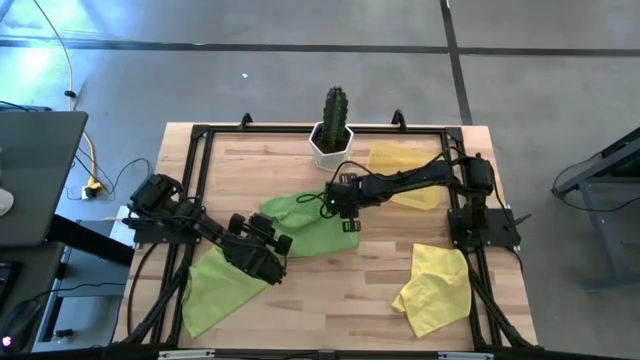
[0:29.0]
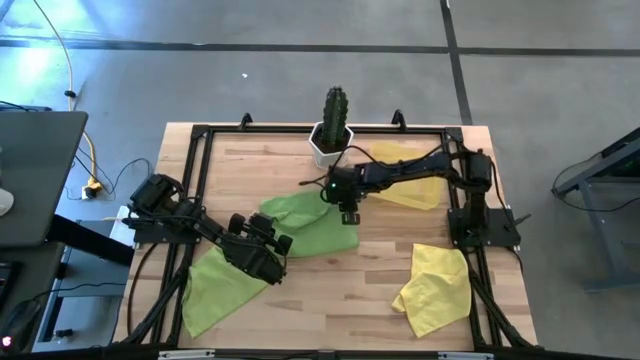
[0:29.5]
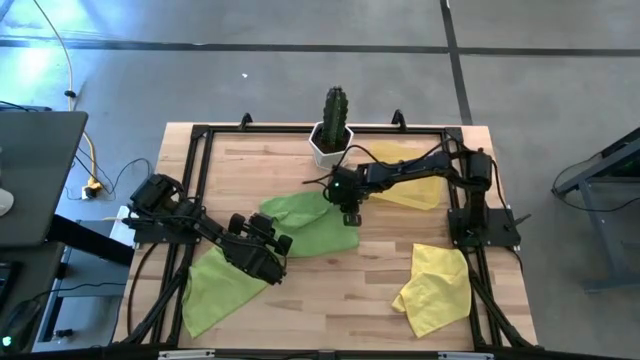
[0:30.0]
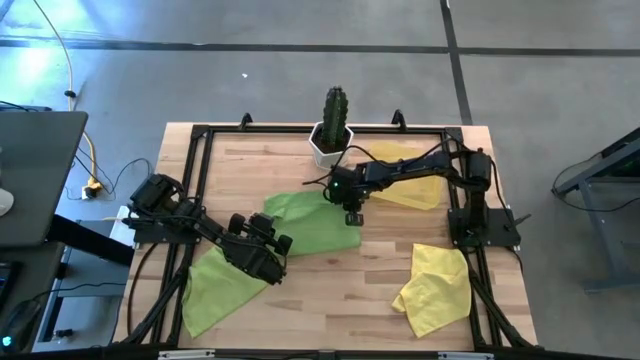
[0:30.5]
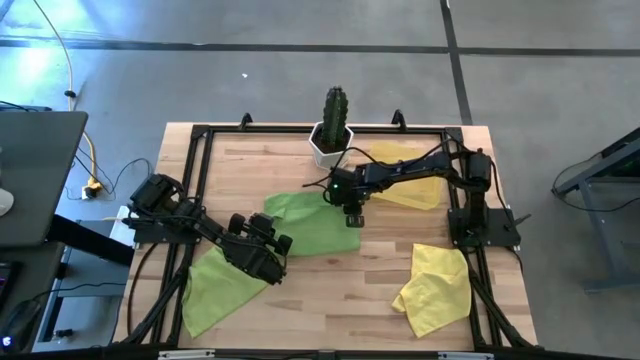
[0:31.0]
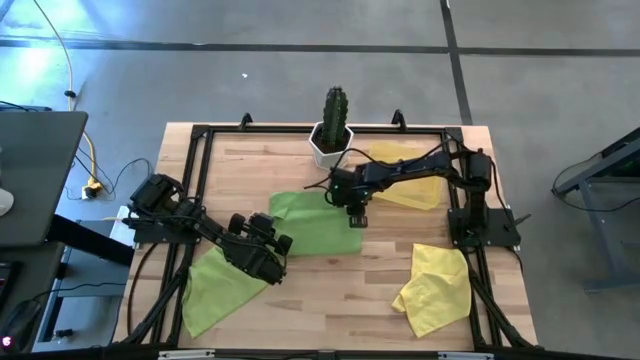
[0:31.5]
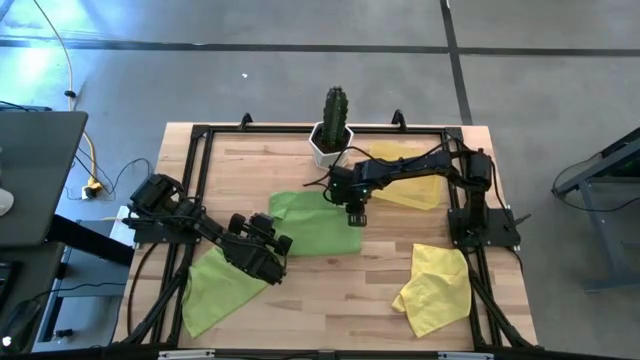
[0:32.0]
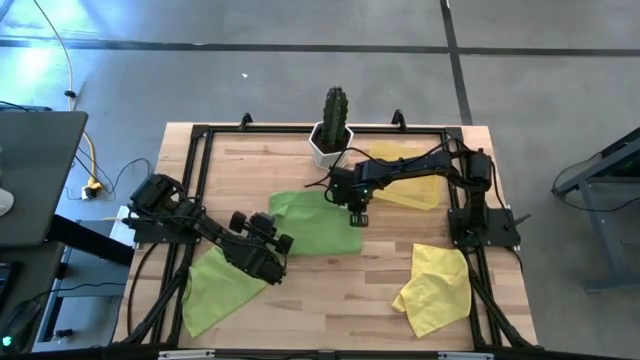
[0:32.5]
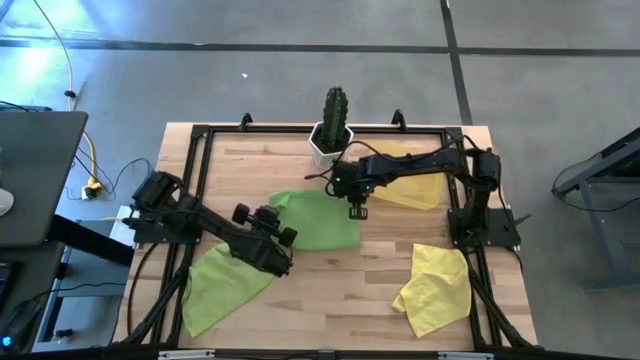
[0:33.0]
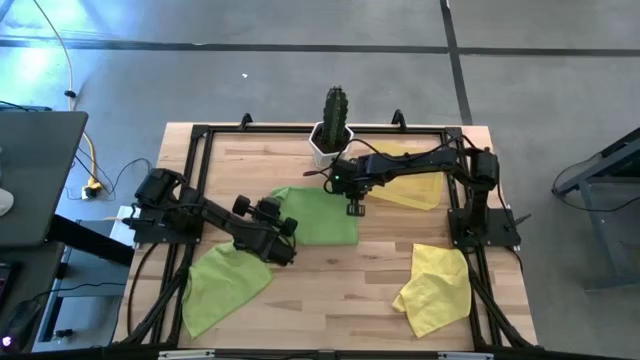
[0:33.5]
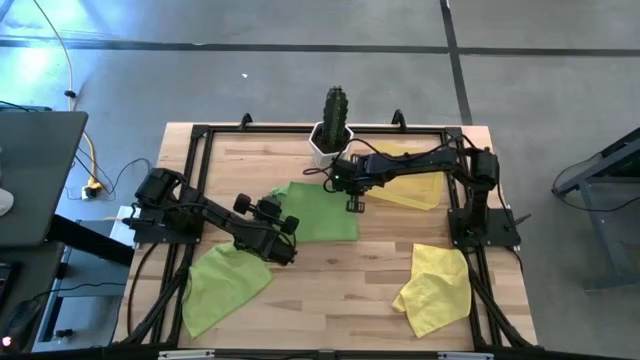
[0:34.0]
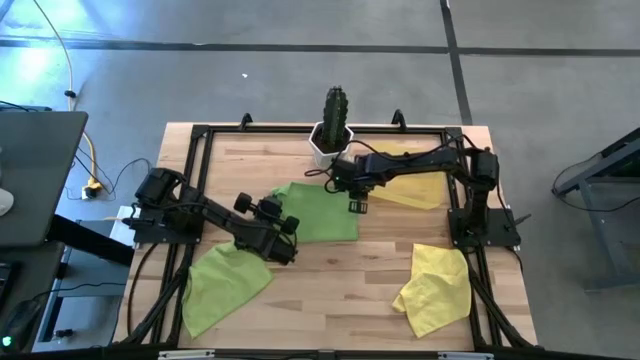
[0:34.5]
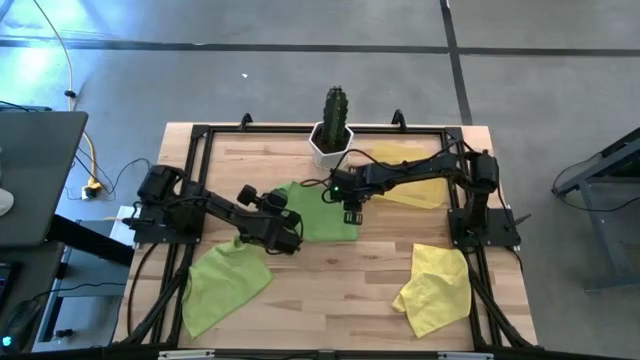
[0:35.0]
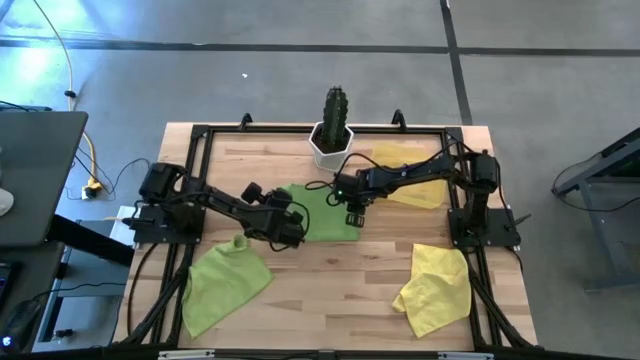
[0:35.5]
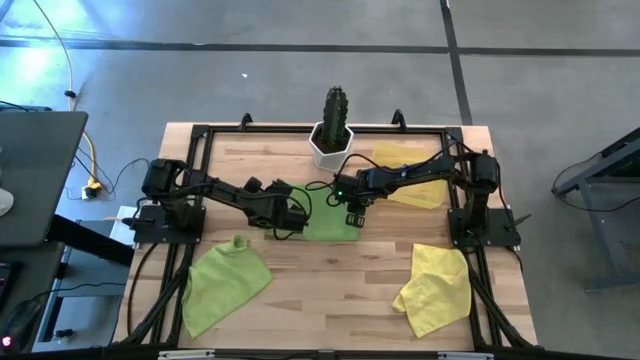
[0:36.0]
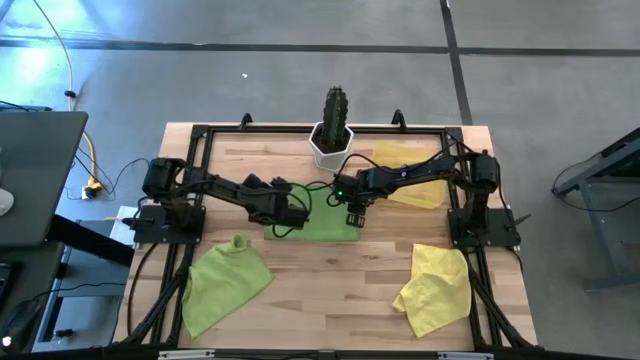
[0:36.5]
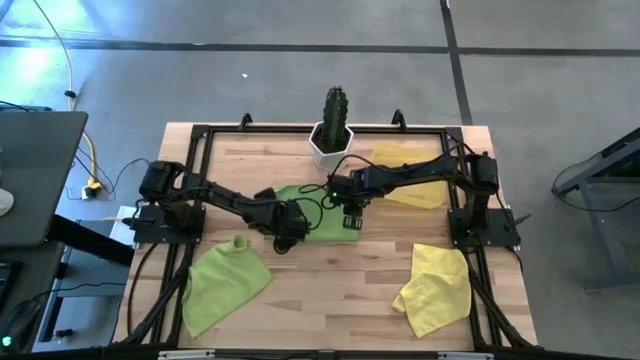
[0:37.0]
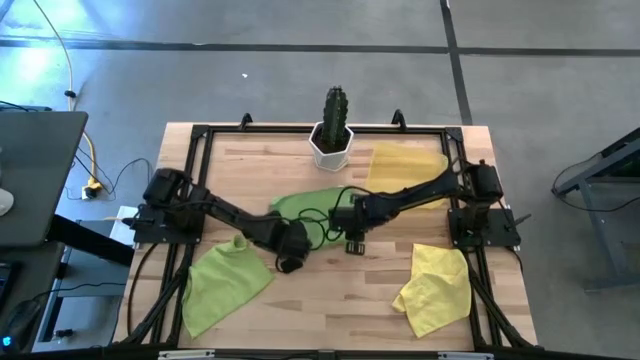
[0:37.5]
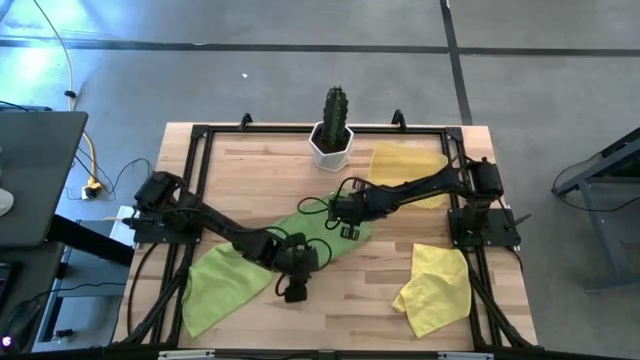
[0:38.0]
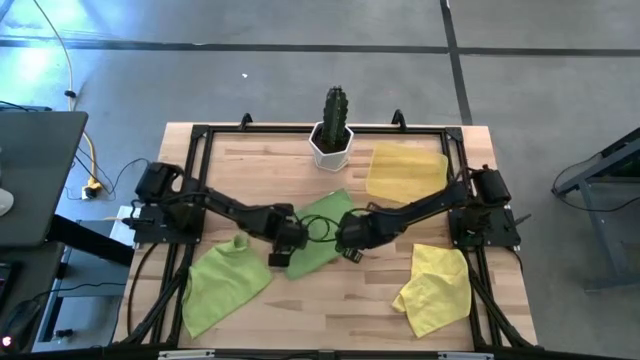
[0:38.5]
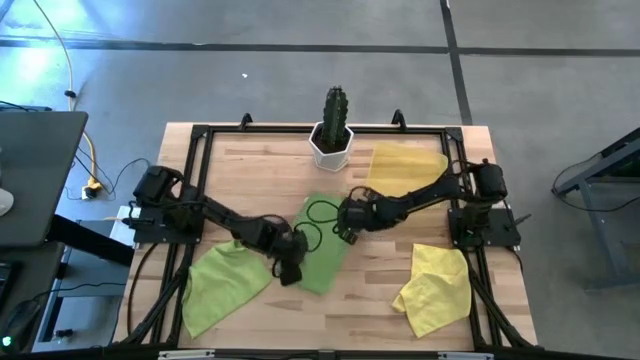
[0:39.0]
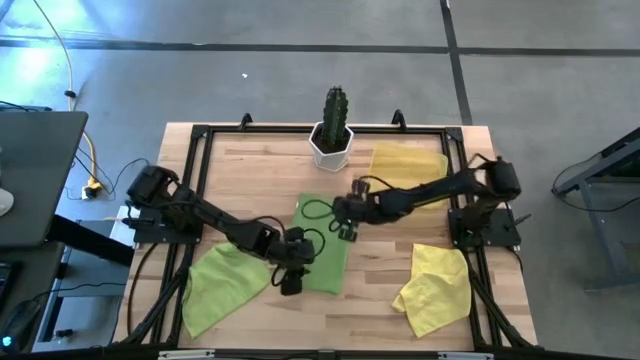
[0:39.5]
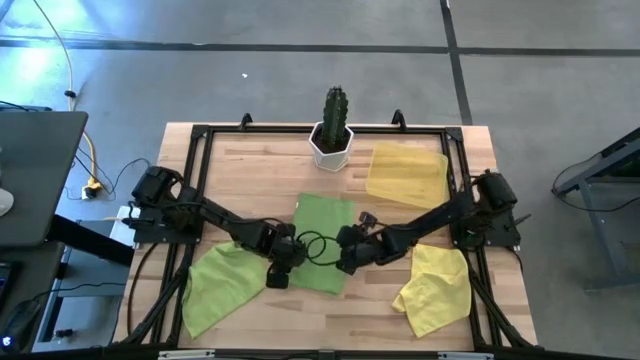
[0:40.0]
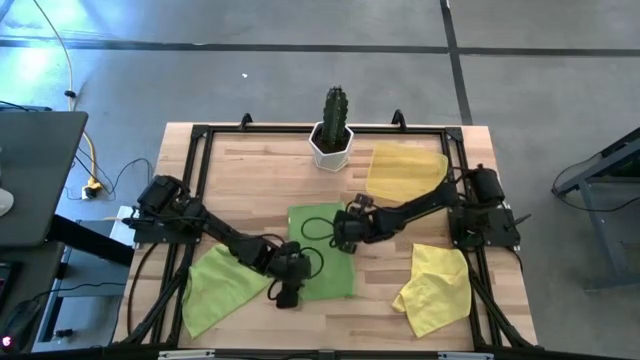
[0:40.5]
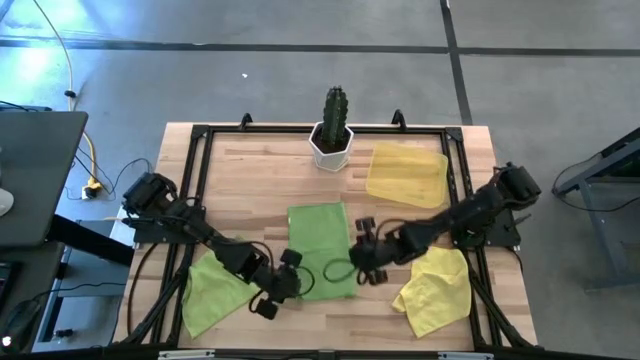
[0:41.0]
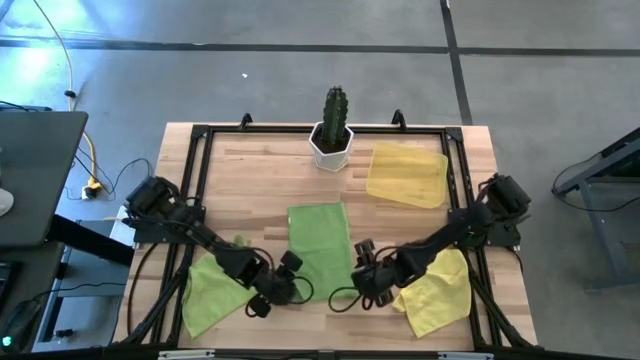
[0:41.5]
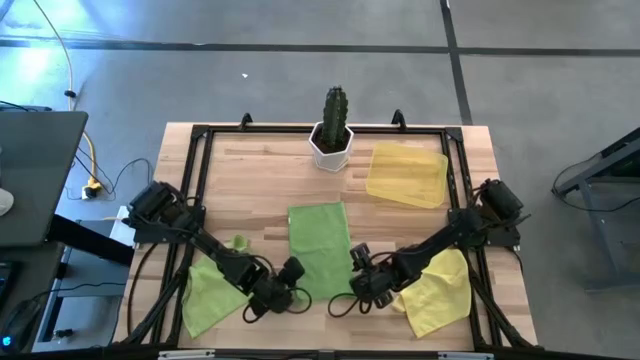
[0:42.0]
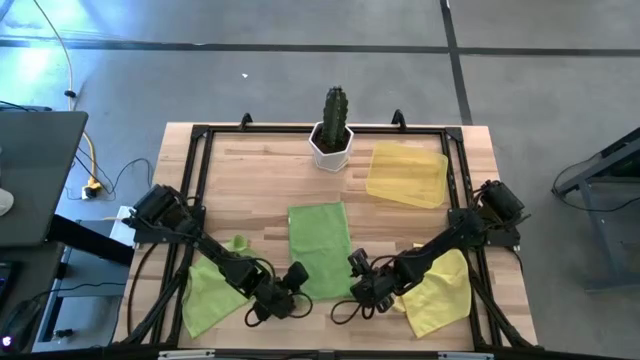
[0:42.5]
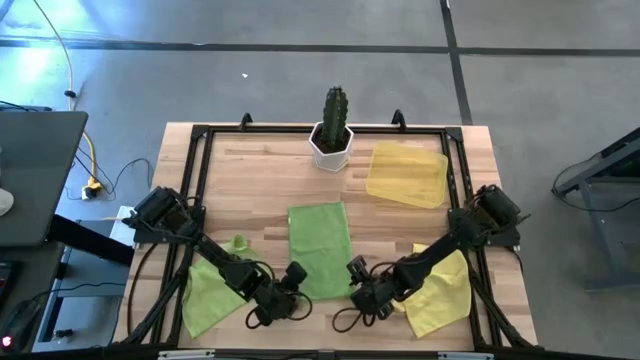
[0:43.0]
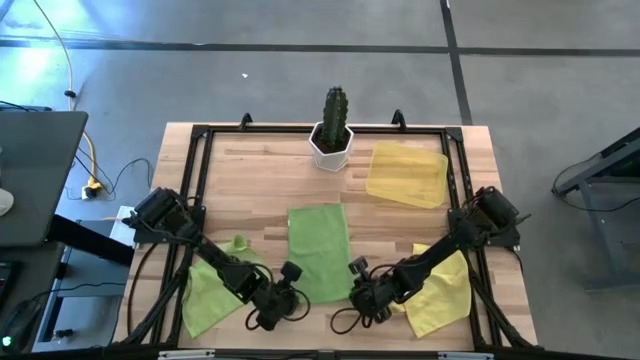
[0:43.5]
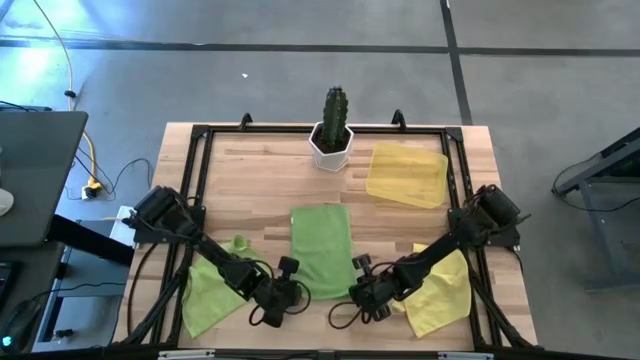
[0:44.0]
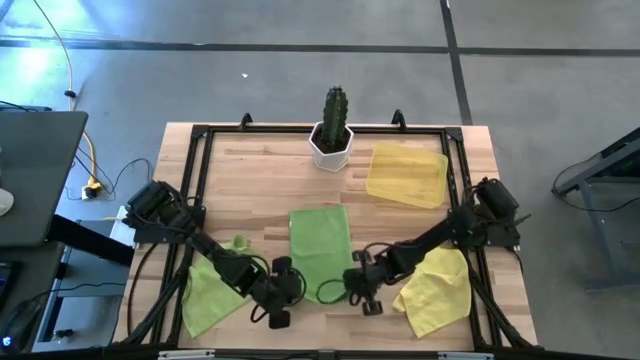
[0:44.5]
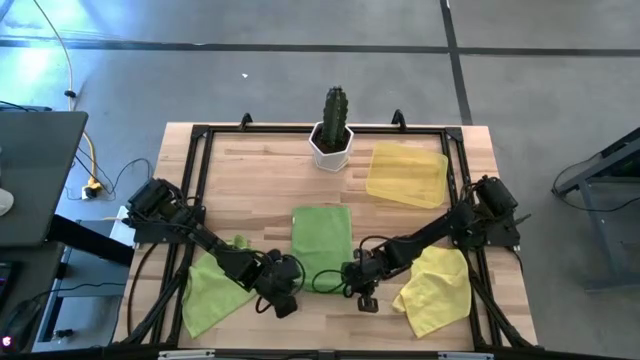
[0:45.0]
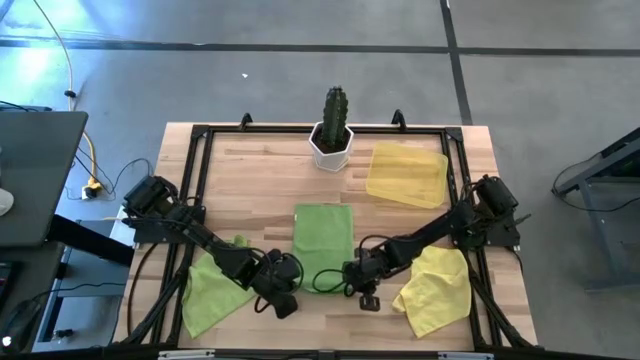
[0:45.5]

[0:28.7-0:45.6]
Task: Roll microfiber towels into tight, uniform cylinder then place into a basket
Roll the green towel

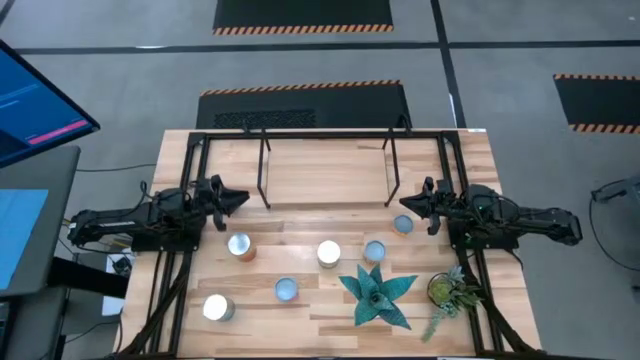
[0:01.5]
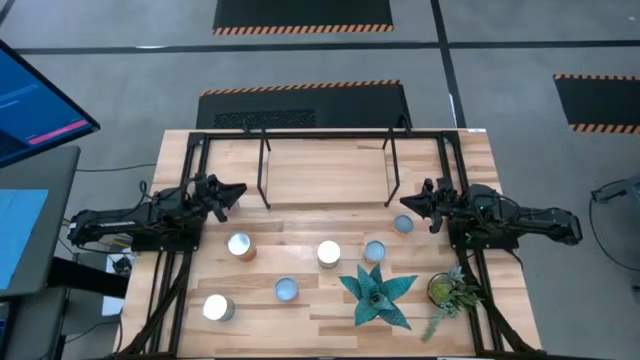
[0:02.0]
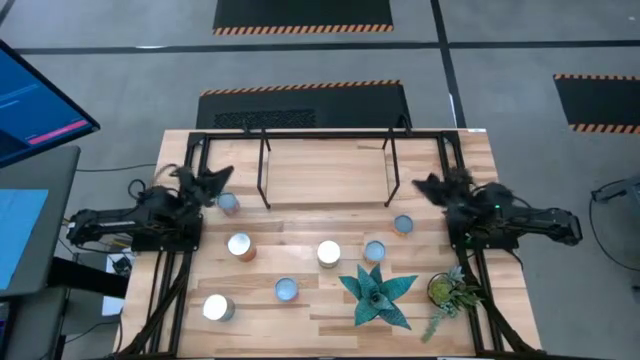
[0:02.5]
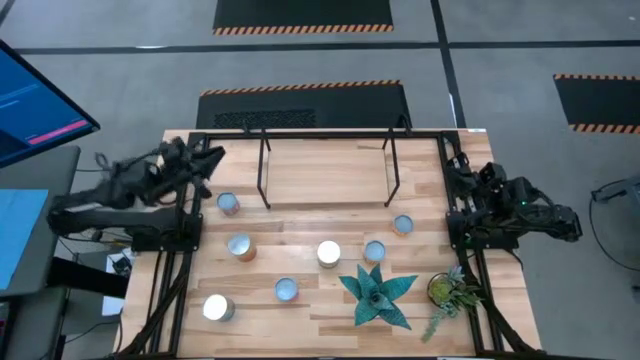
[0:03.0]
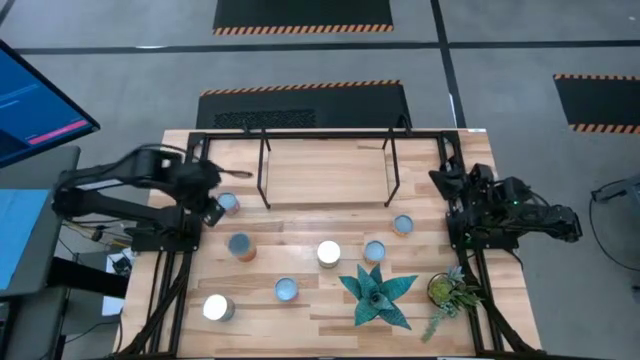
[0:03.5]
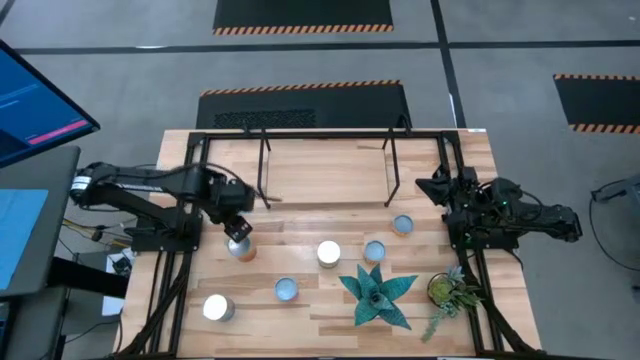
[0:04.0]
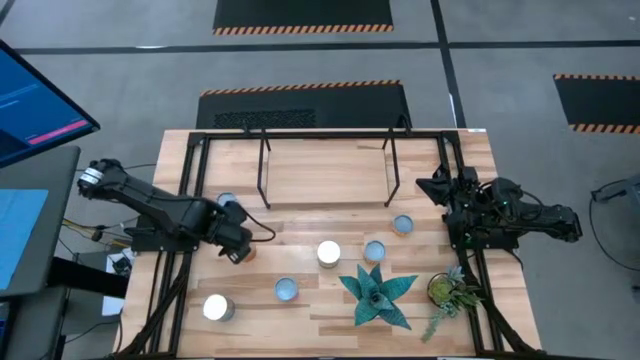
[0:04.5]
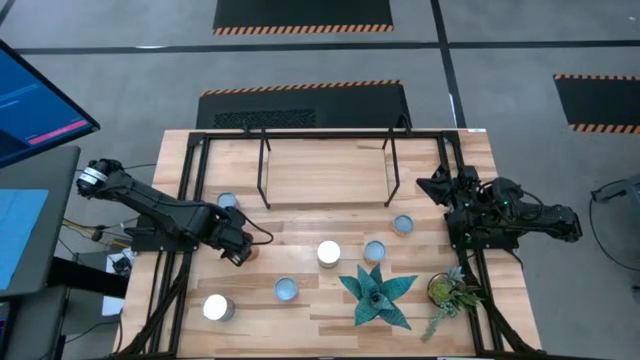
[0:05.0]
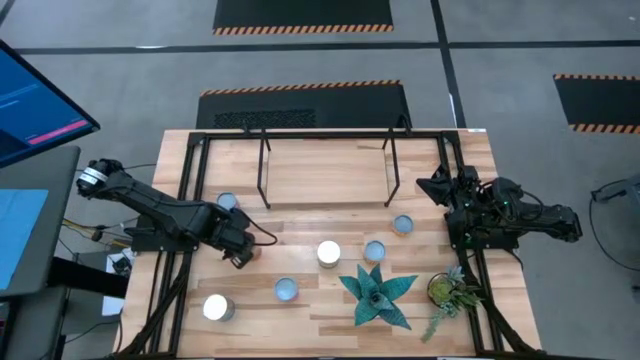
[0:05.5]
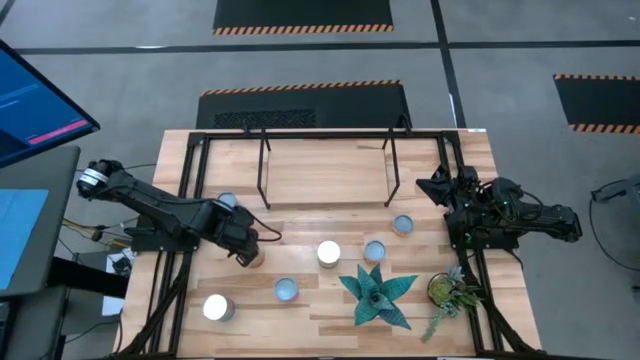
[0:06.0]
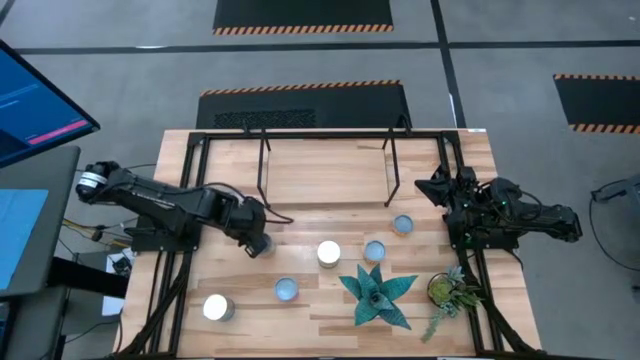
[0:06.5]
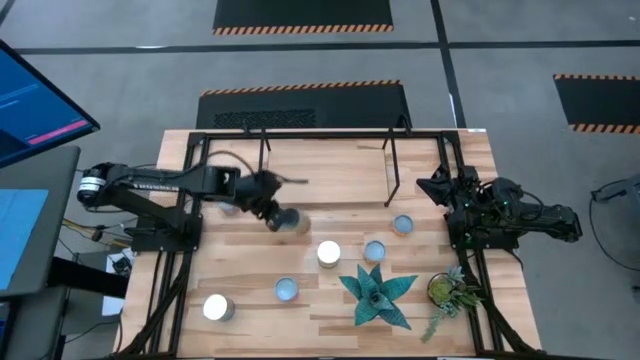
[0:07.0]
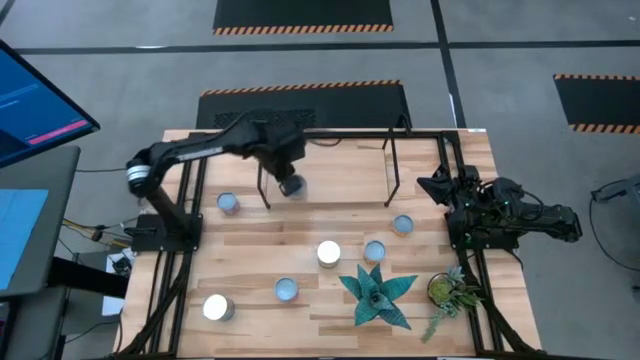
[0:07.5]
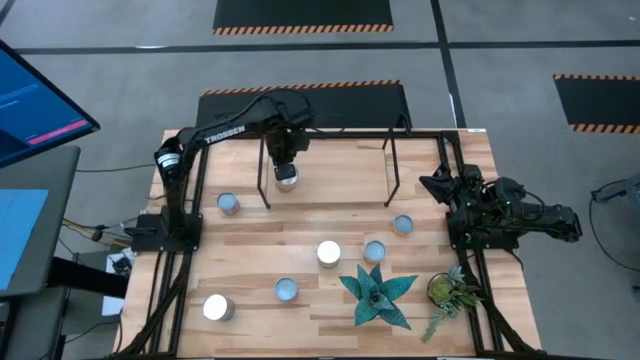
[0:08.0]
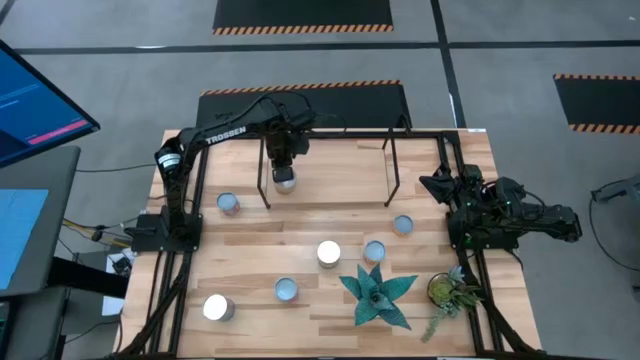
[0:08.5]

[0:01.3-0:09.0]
Task: Pick and place cans onto a shelf
Put the canned beans on the shelf
